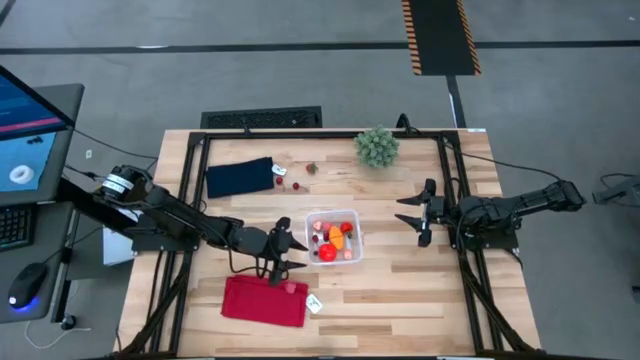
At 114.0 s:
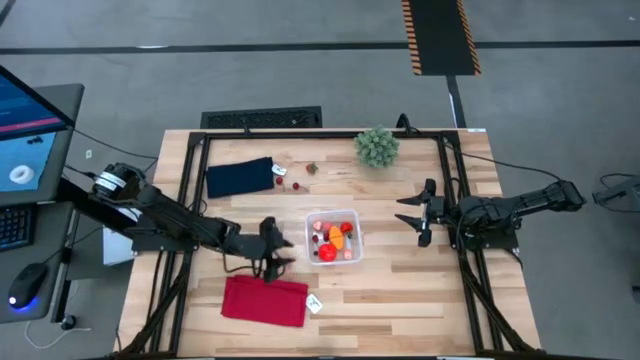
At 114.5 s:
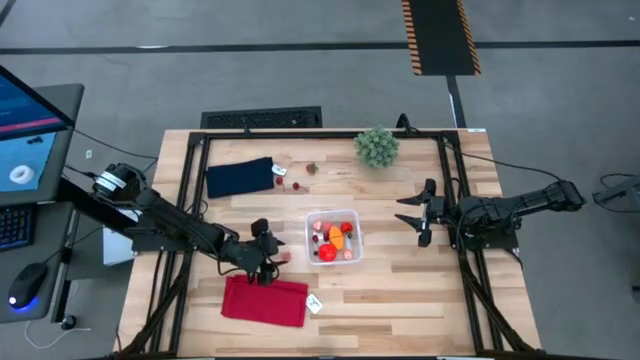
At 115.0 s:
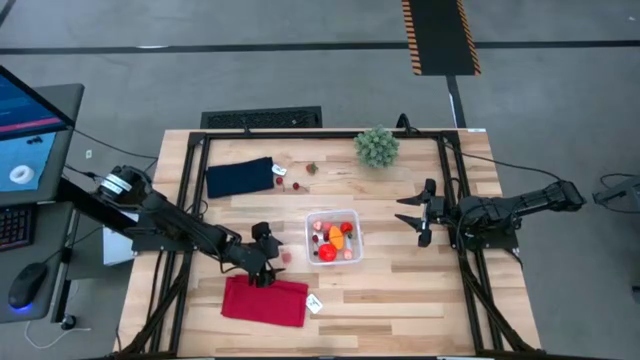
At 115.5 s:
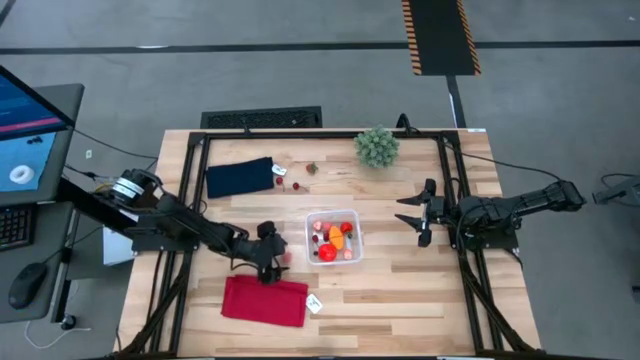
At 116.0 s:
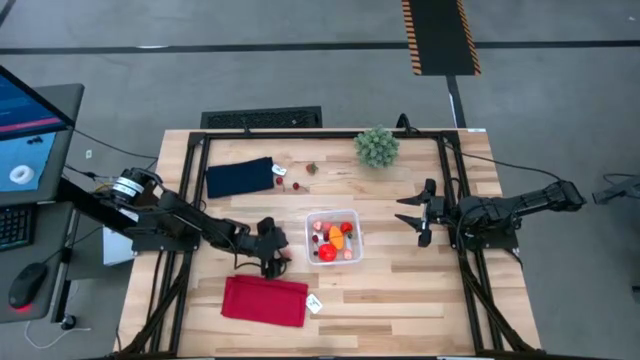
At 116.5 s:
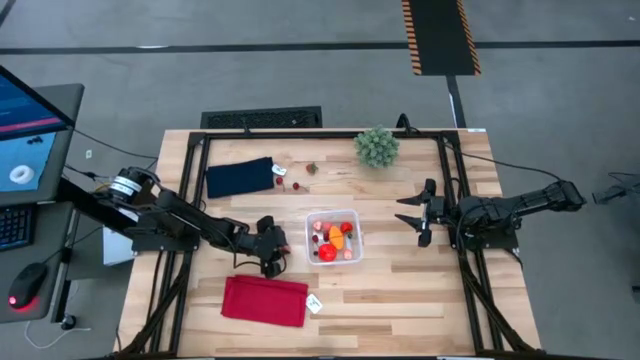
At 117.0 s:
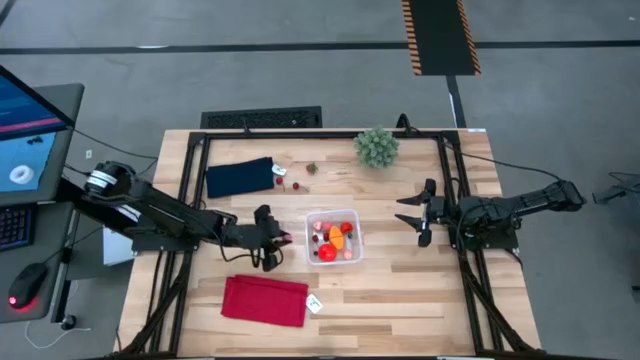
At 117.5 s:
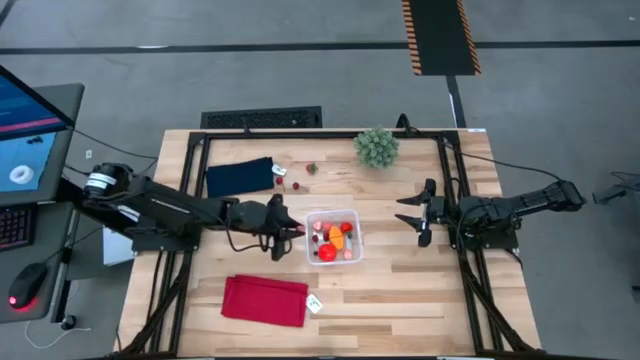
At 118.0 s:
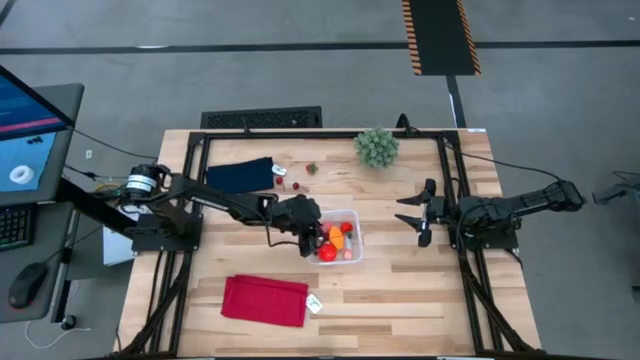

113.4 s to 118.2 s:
Task: Pick and placing Produce into tupperware
Put the pink peach into the transparent bin

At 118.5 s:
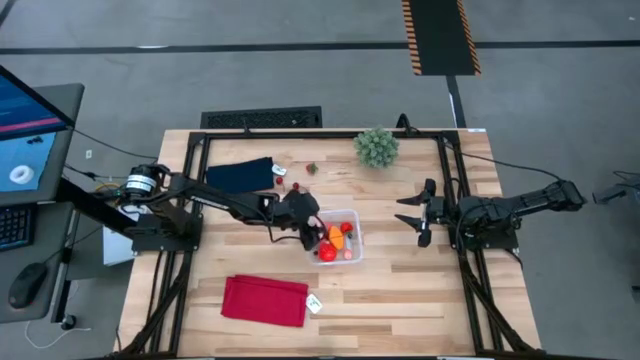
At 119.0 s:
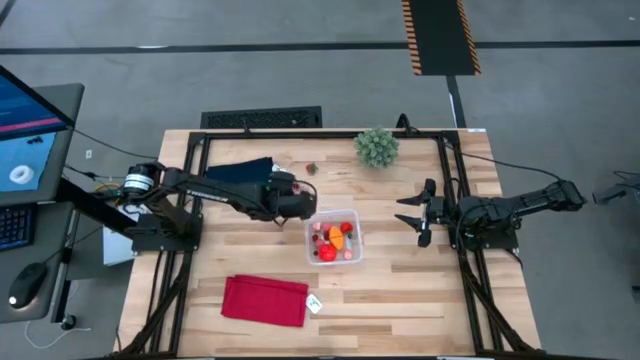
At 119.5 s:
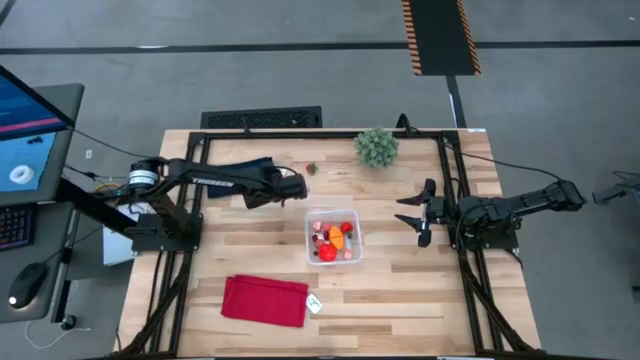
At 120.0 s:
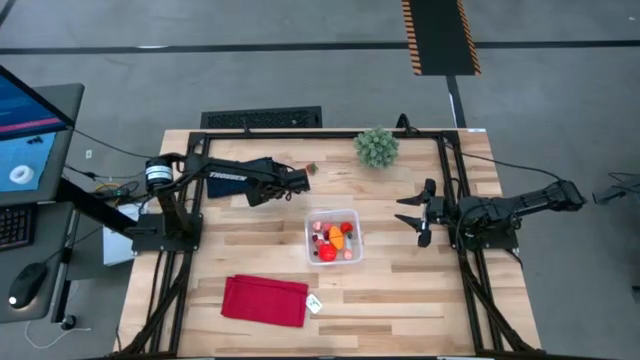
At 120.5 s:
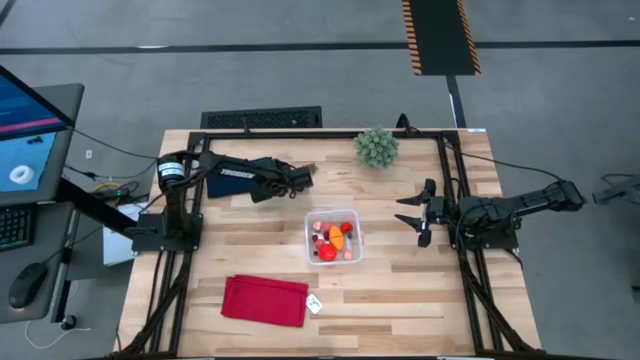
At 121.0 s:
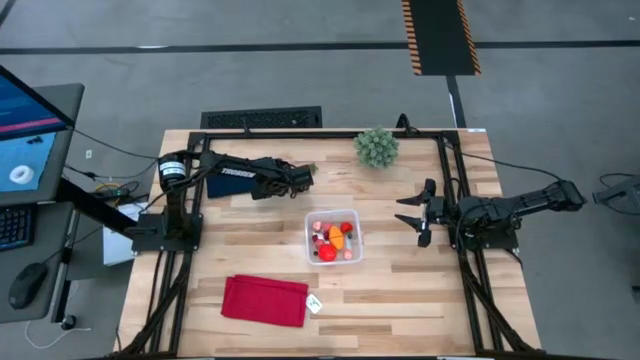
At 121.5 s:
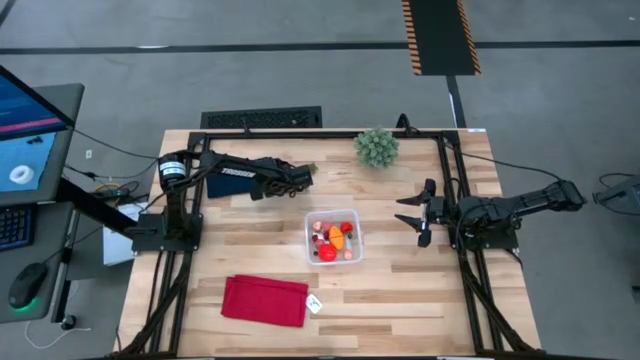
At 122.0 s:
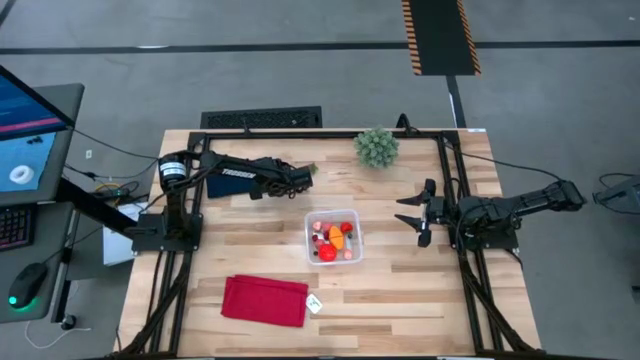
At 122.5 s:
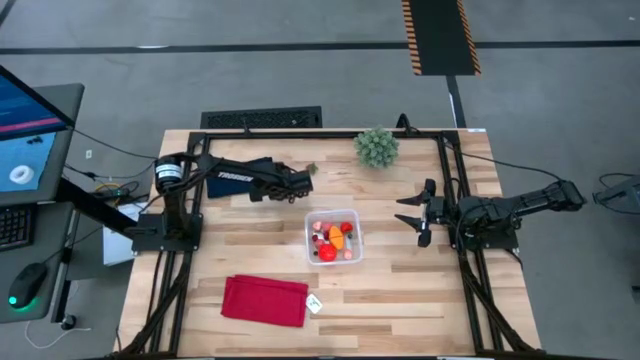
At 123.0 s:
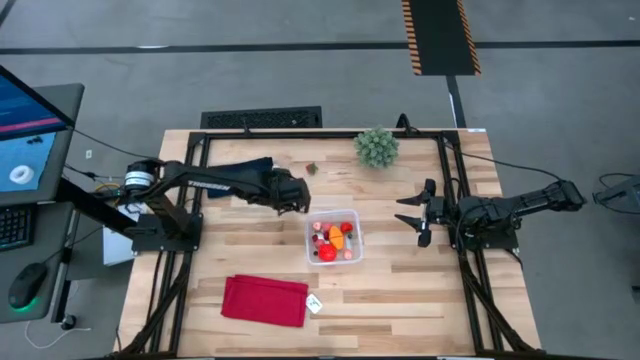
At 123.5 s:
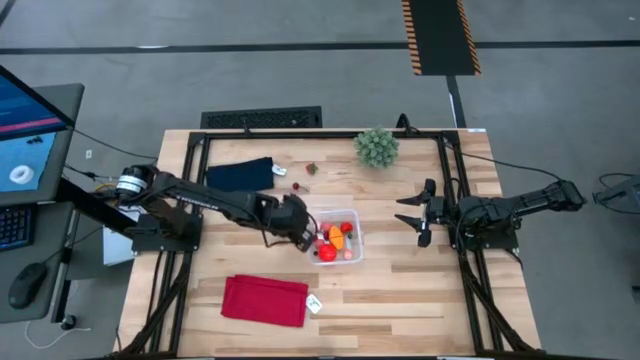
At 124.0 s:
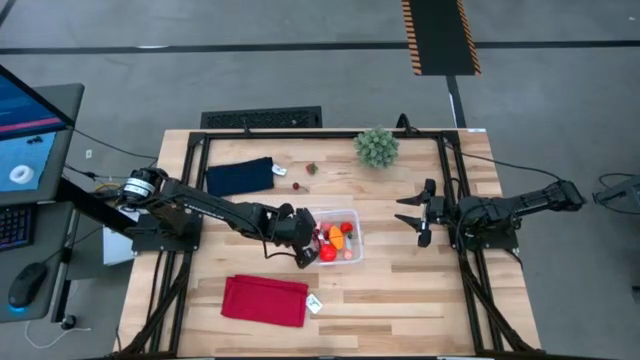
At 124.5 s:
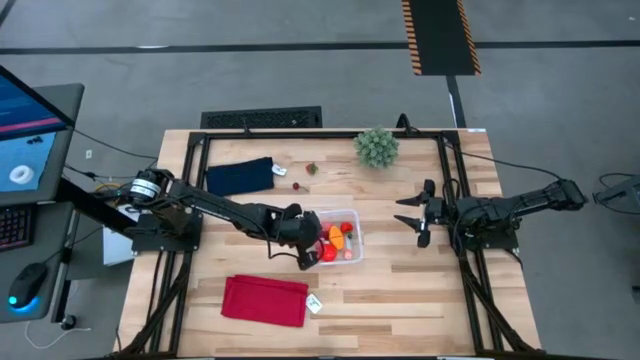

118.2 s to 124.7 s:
Put the red cherry into the transparent bin

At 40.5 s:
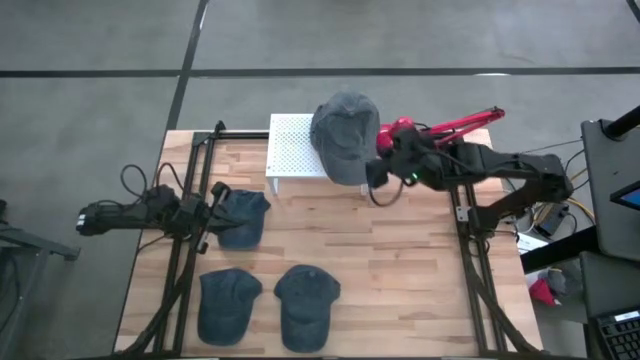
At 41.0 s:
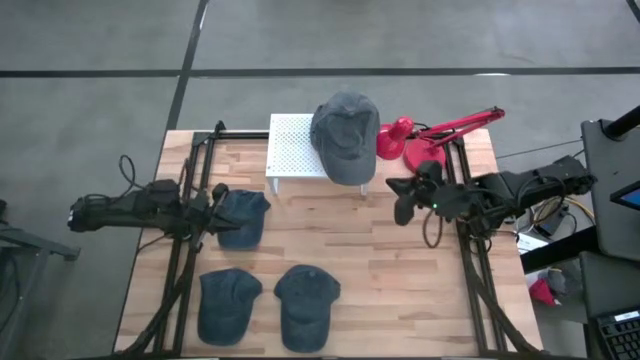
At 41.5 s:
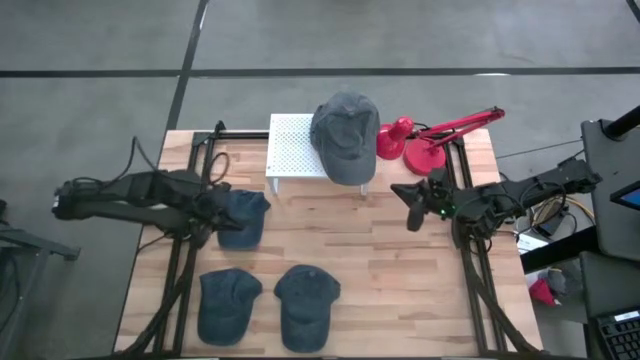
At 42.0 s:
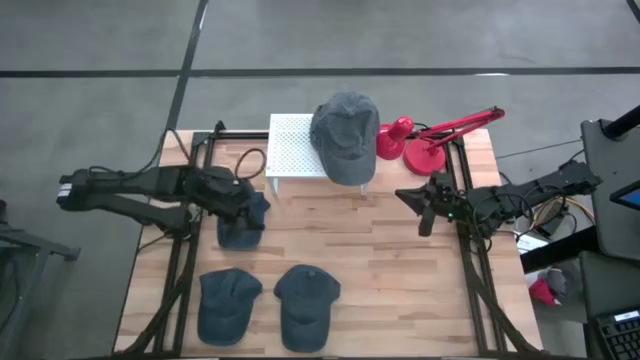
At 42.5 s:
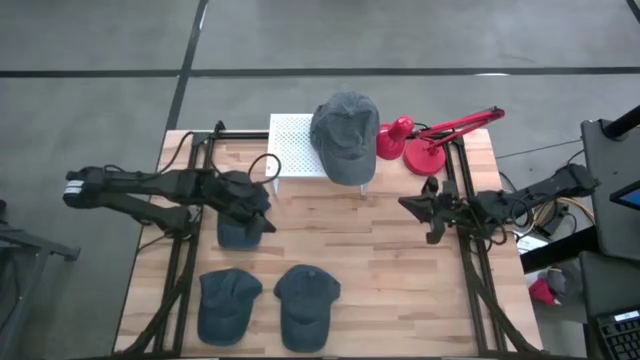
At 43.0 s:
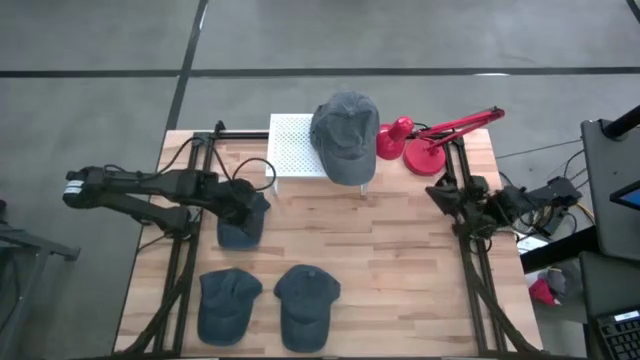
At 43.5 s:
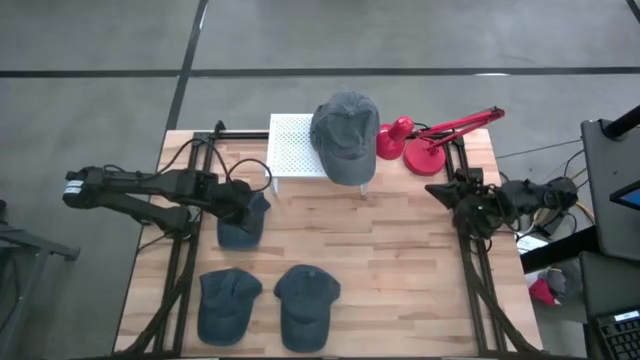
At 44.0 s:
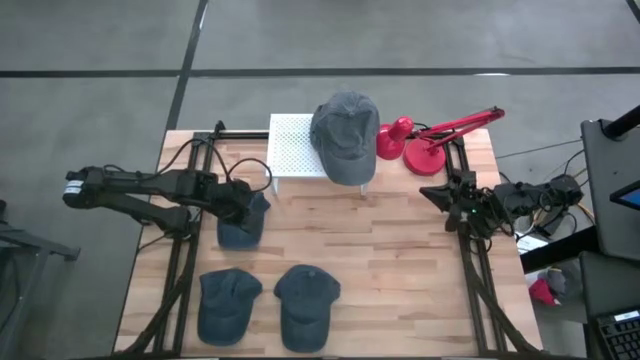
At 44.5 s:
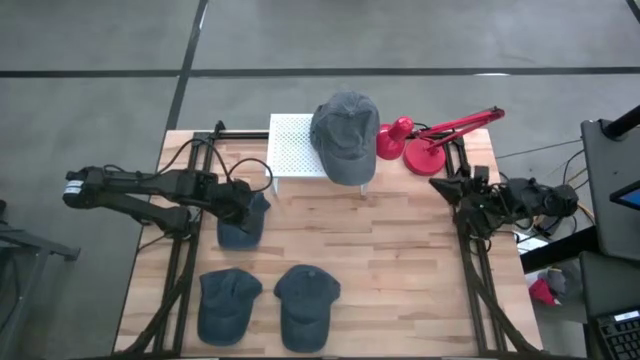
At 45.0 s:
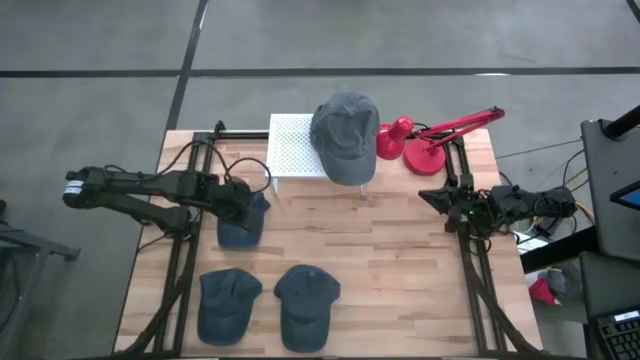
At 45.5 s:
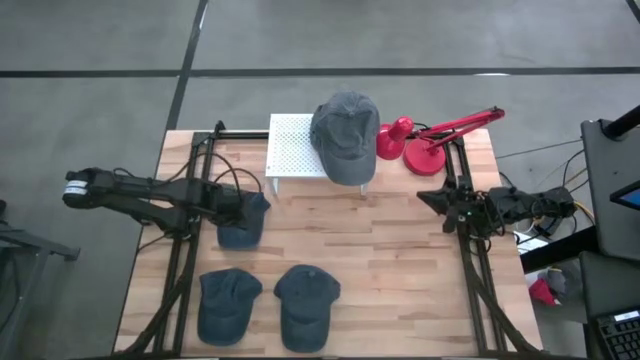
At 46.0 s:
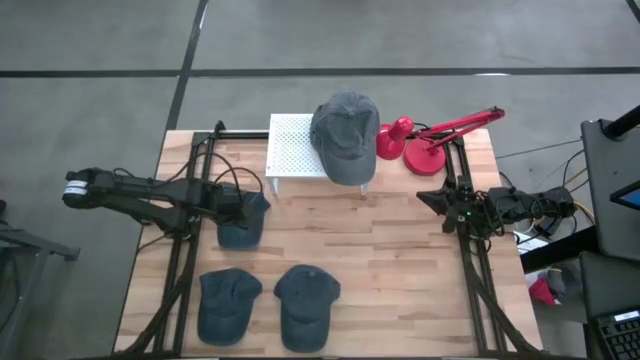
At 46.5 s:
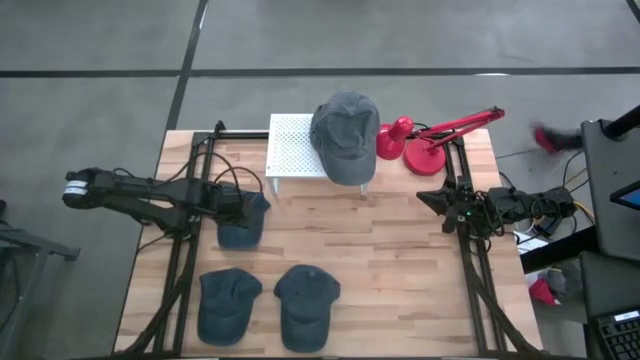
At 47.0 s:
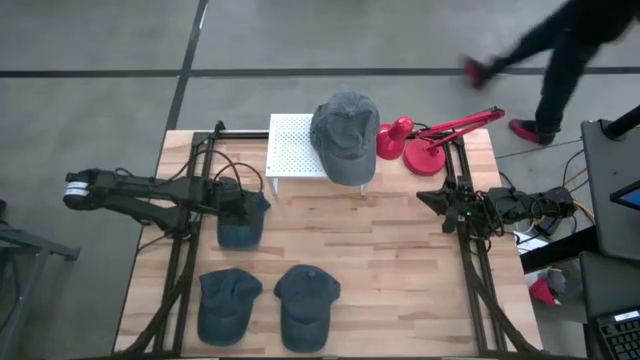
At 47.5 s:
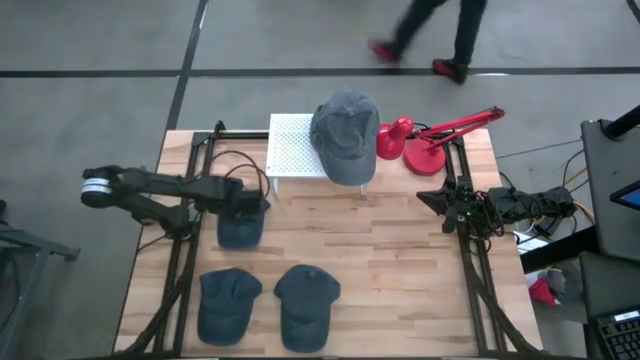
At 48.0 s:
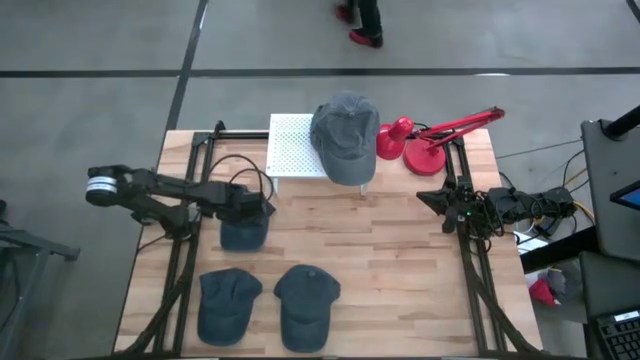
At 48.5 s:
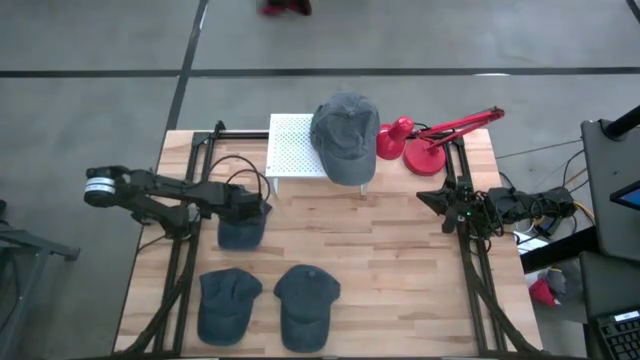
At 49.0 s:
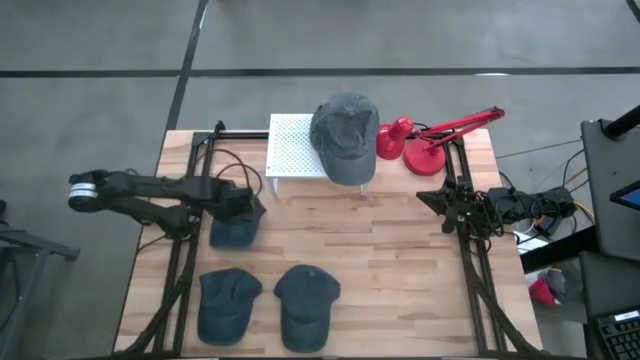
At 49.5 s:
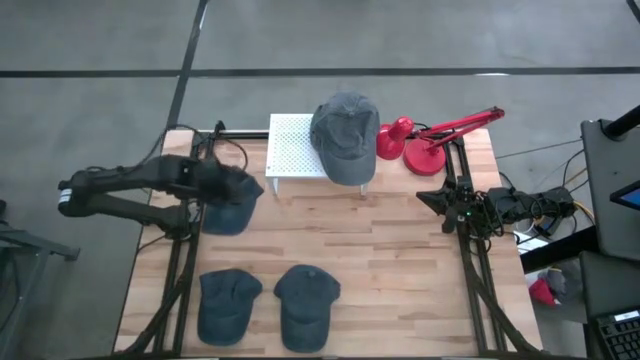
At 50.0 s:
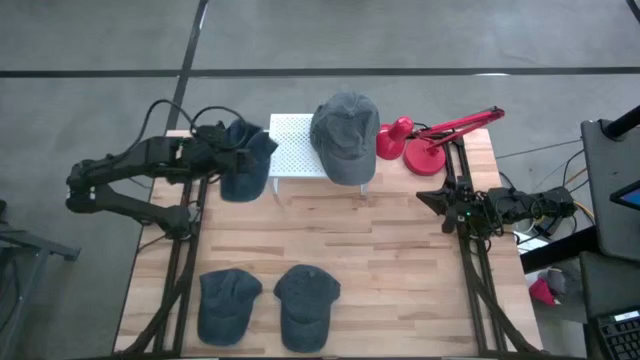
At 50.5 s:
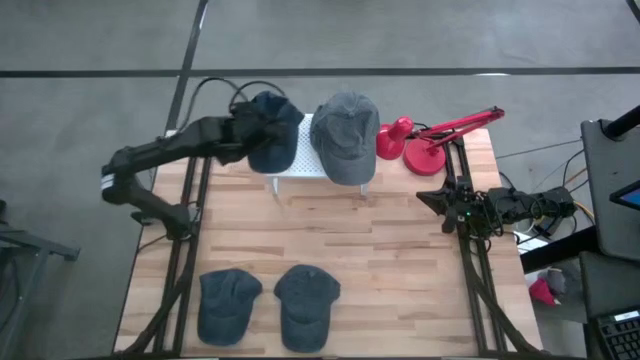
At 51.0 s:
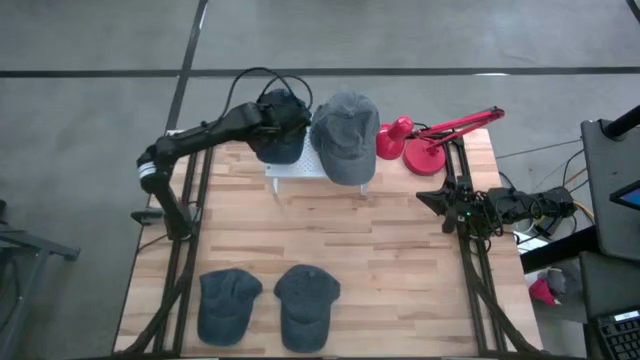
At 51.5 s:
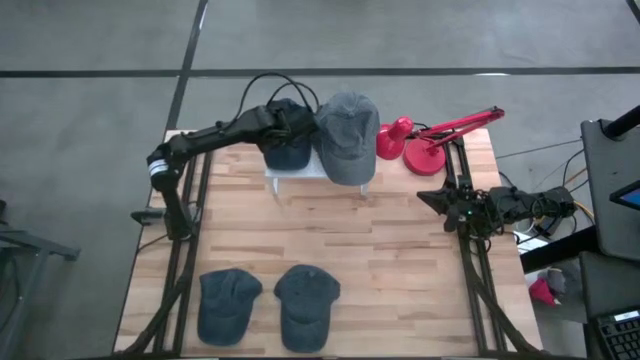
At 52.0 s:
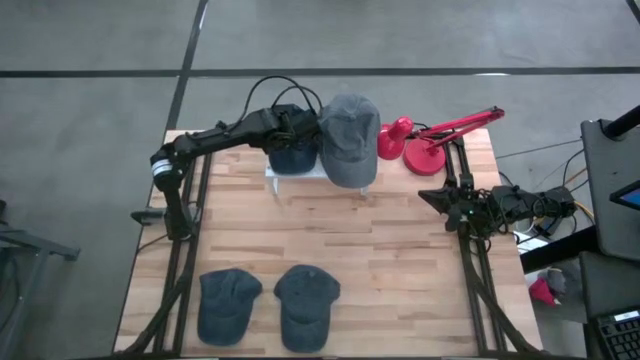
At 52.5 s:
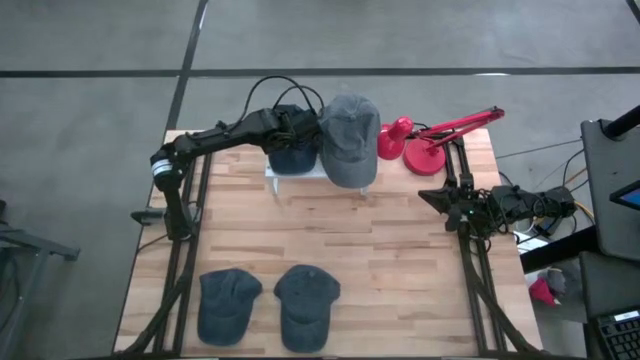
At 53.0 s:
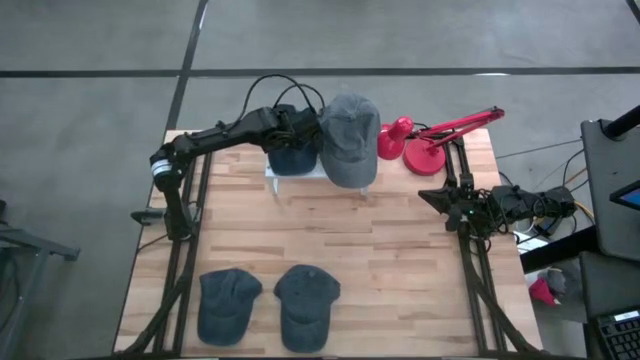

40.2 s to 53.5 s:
Task: Pick & Place hat
Put the top blue cap on the shelf
